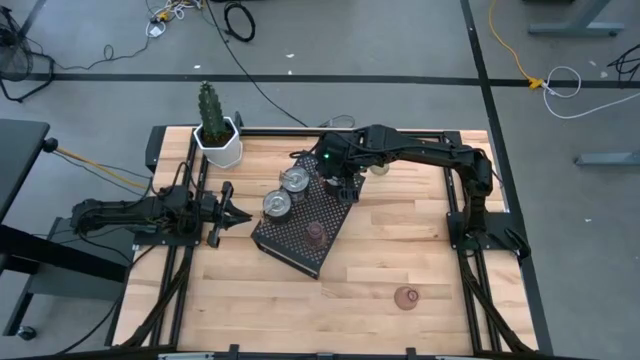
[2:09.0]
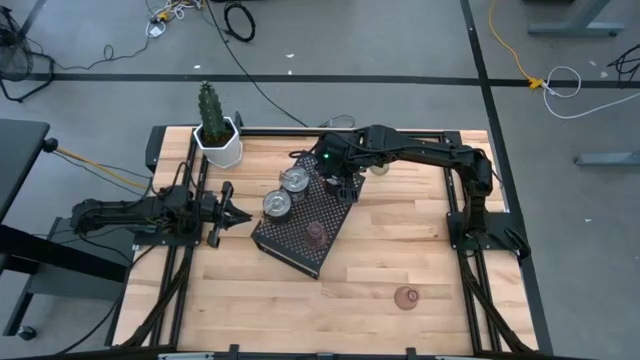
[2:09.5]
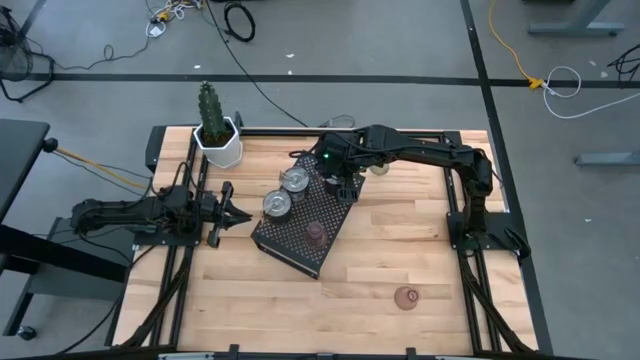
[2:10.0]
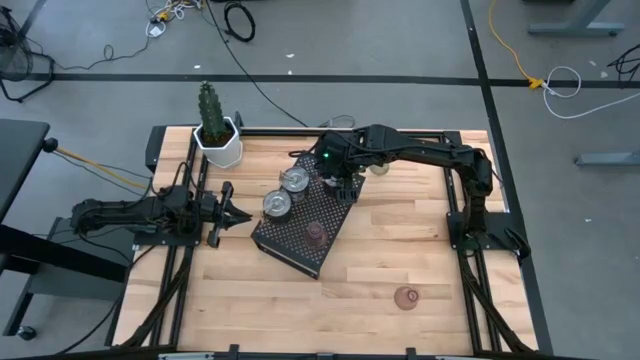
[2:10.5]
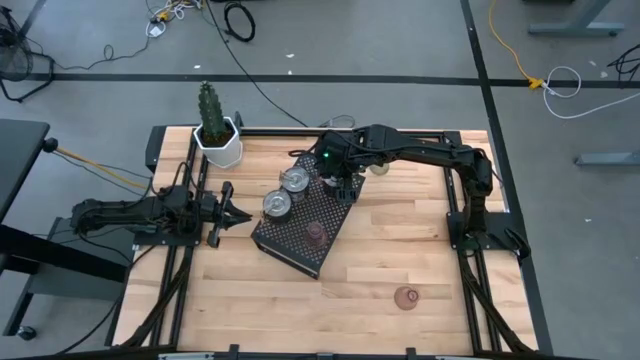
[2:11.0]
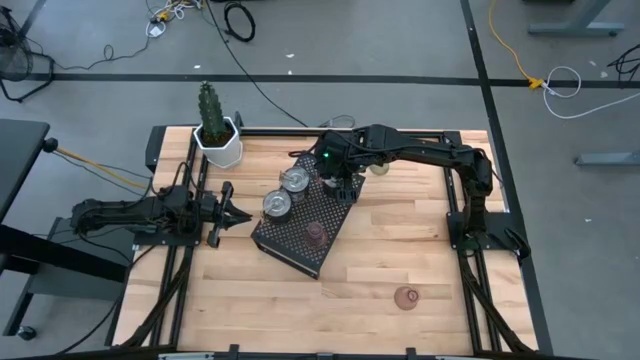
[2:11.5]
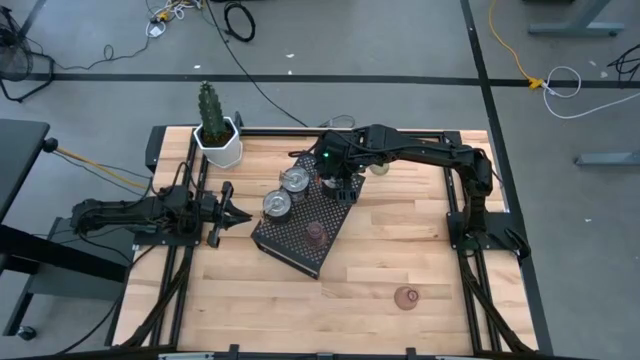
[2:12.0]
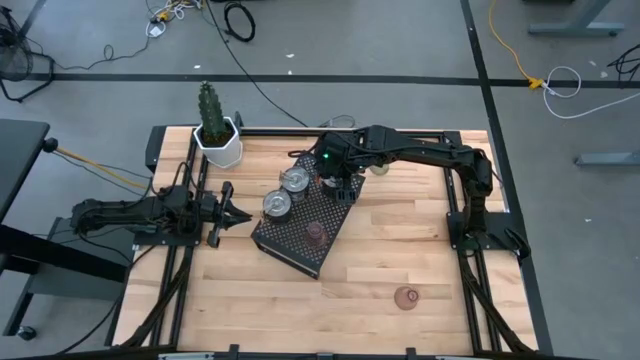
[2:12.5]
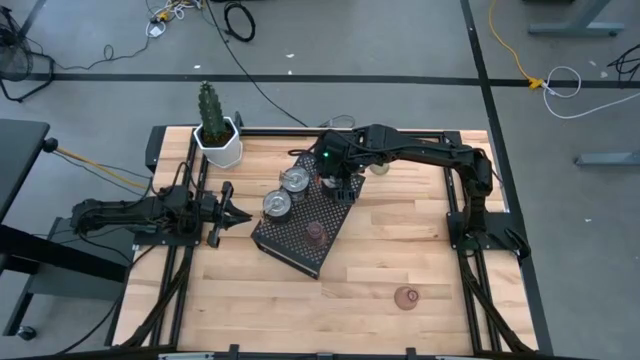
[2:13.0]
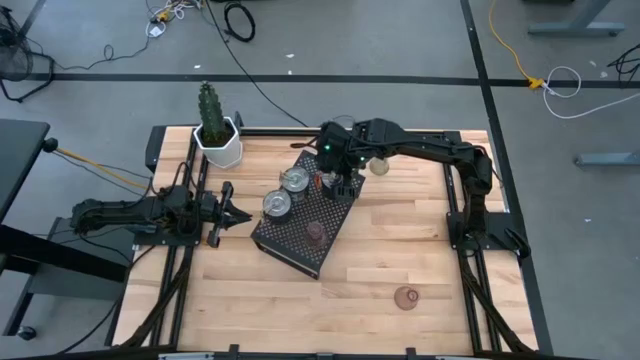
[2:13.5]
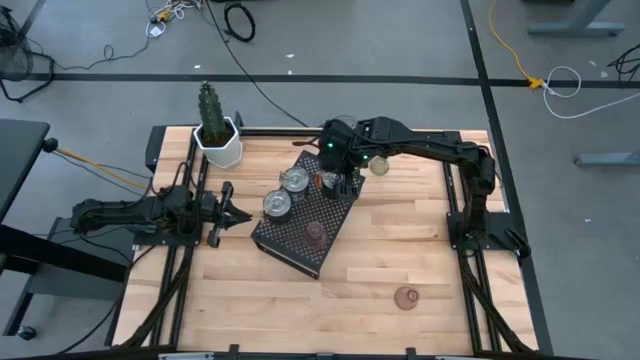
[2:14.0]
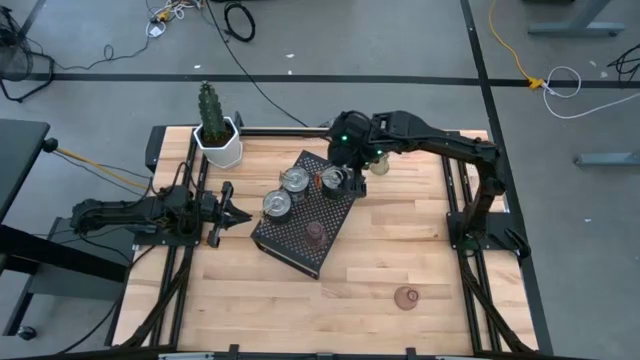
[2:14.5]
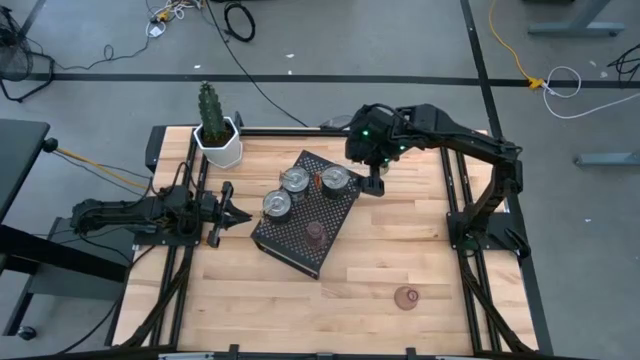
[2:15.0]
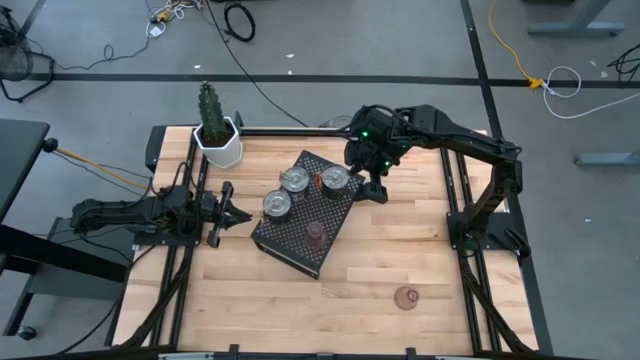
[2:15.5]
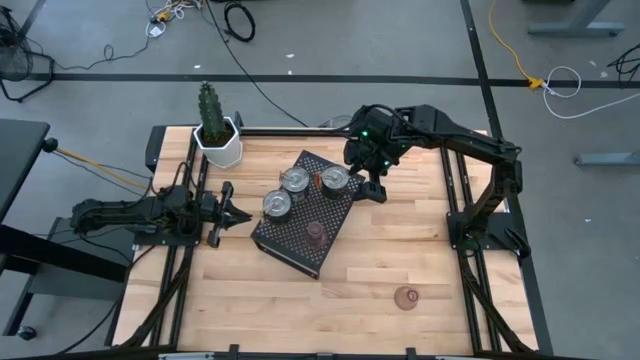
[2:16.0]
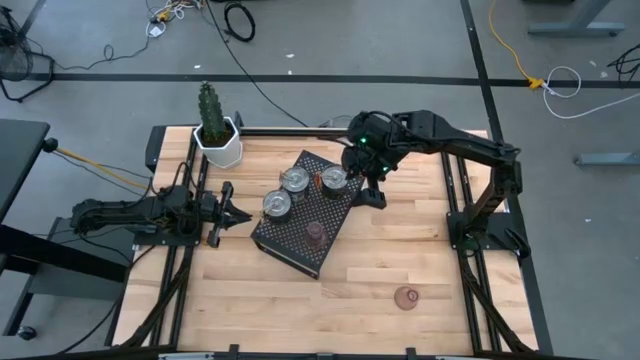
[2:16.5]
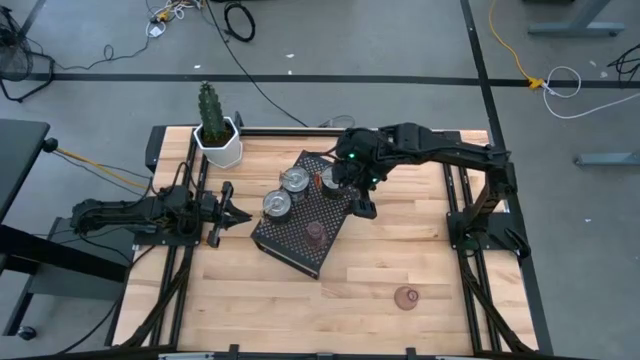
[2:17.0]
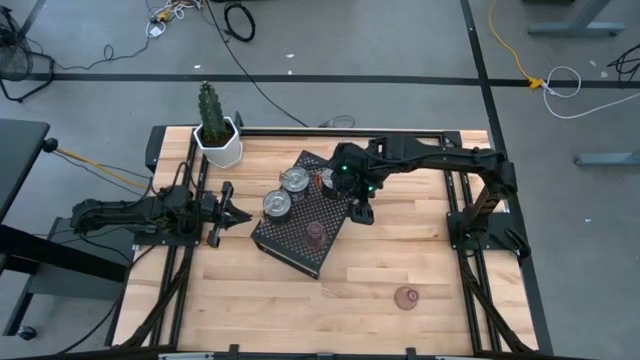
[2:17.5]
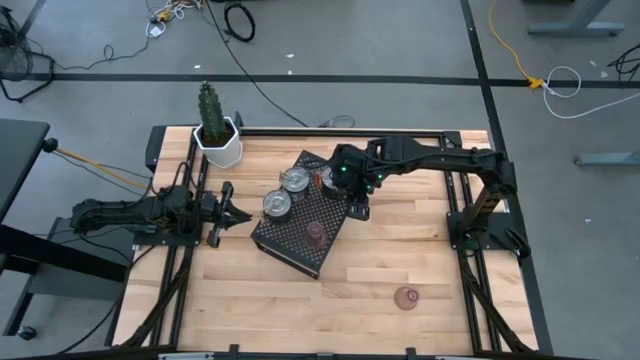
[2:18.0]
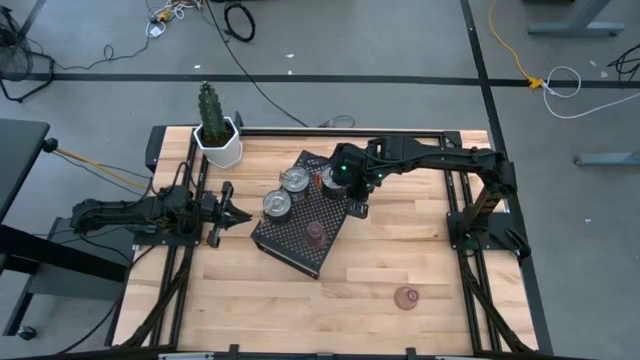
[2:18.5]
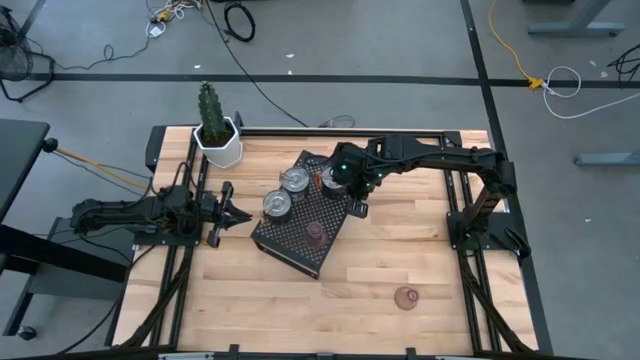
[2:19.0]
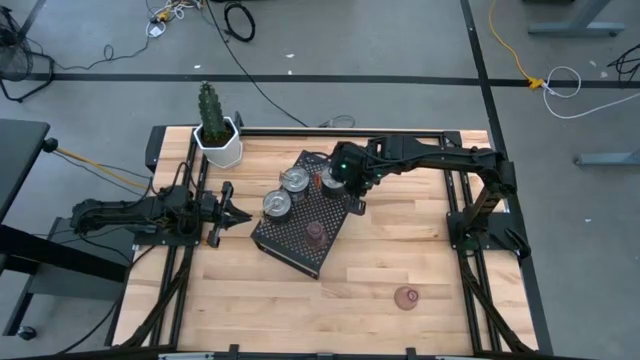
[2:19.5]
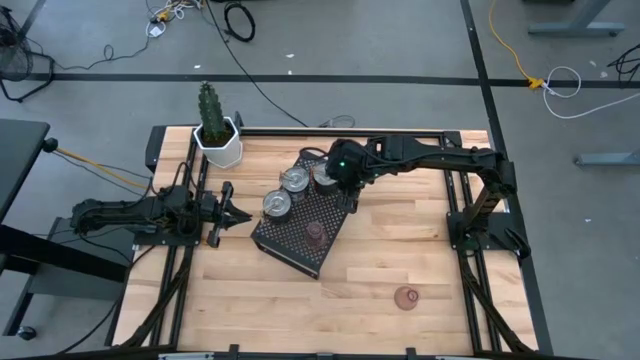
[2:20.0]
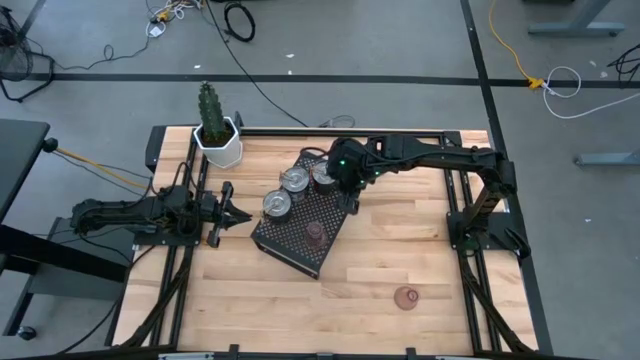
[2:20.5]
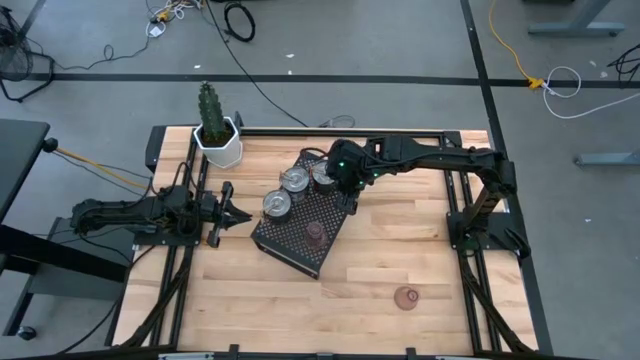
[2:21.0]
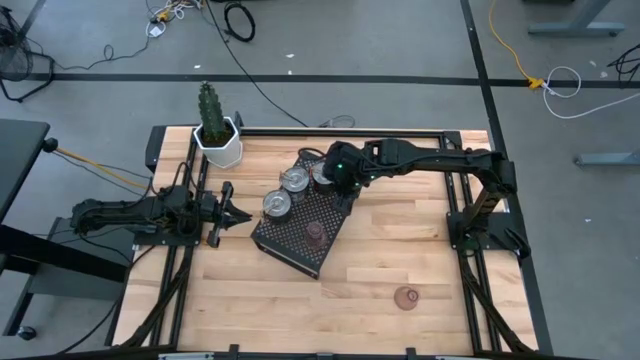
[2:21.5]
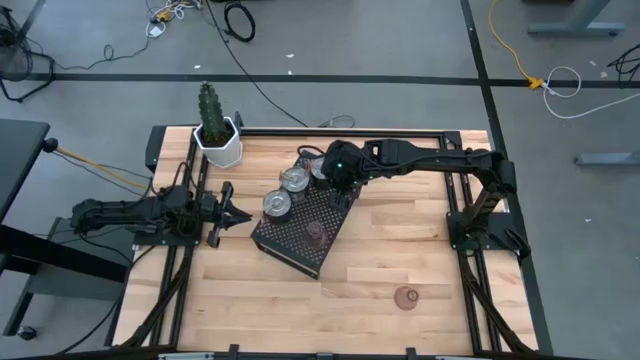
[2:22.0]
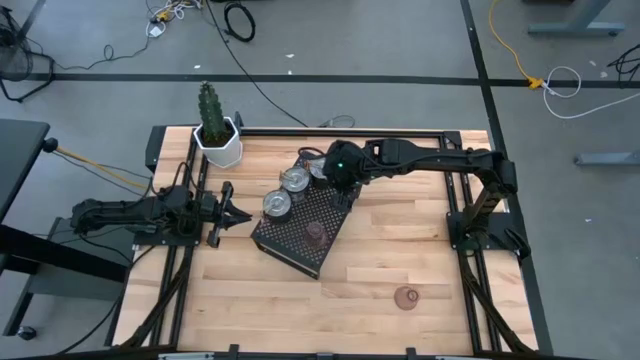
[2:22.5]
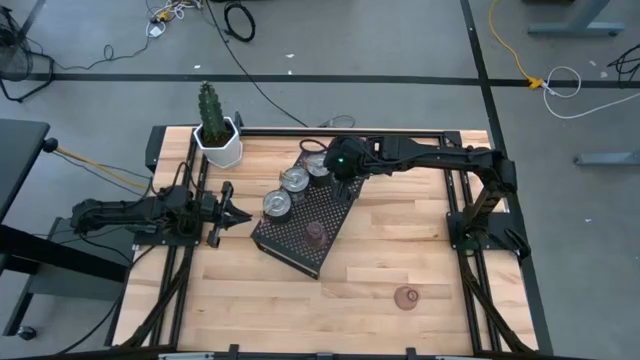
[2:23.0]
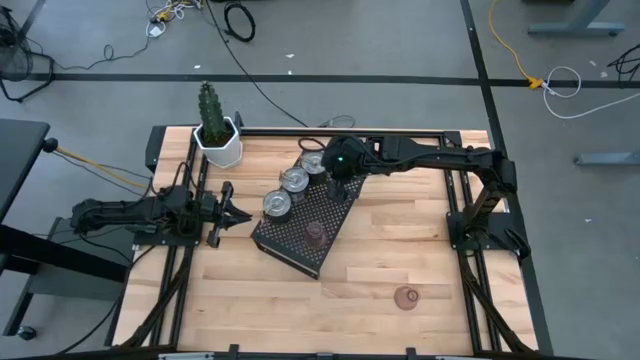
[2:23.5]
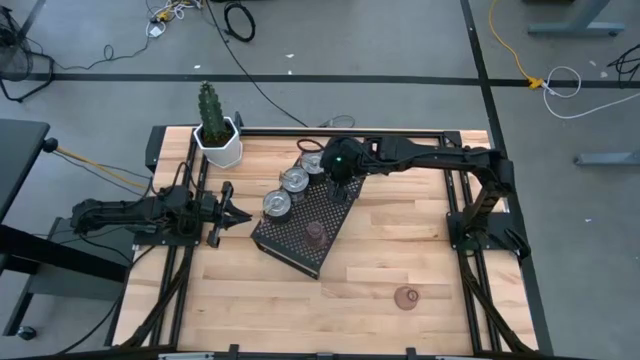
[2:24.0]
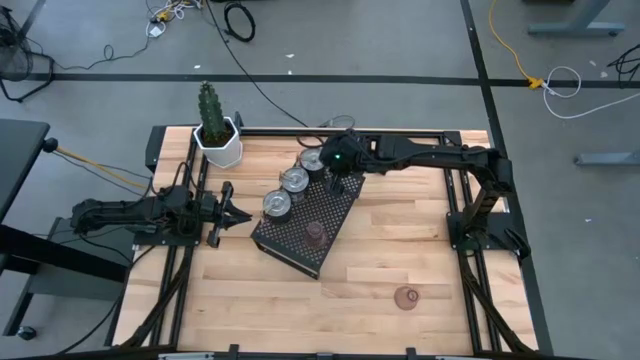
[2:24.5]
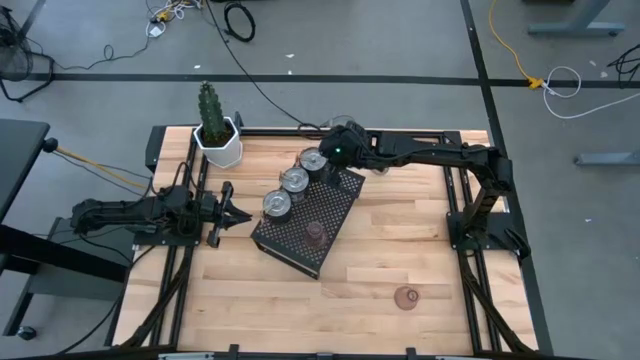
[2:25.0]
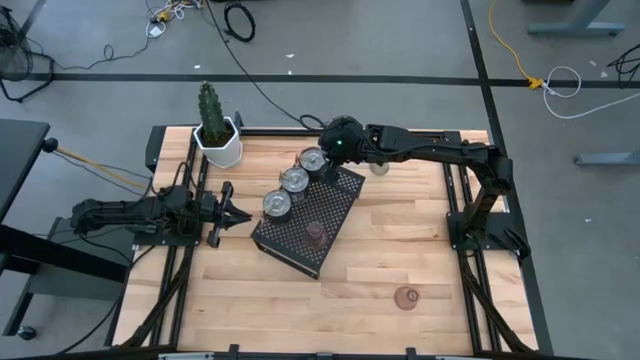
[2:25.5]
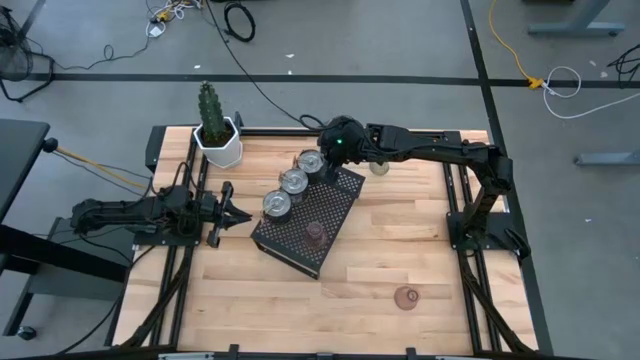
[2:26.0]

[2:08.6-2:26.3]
Task: Pick & Place candle stick holders
Put the silver scented candle on the shelf

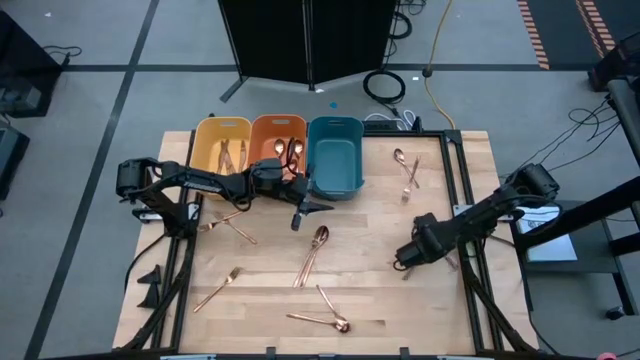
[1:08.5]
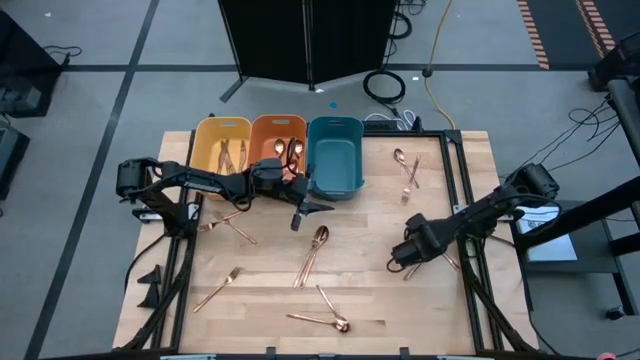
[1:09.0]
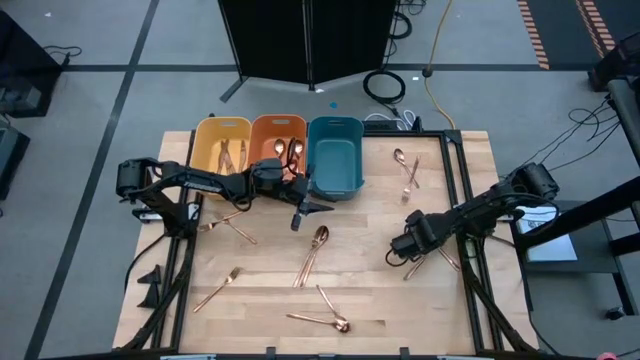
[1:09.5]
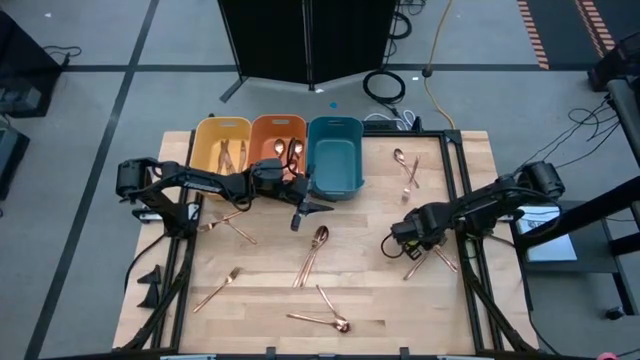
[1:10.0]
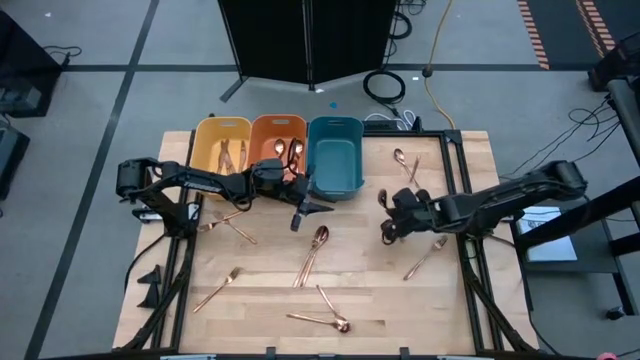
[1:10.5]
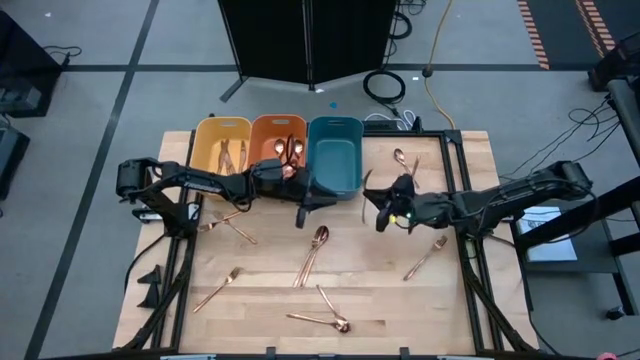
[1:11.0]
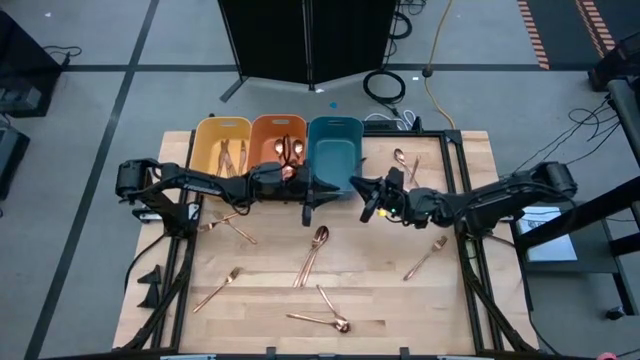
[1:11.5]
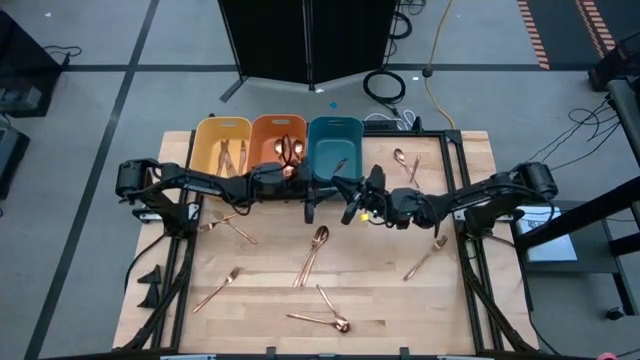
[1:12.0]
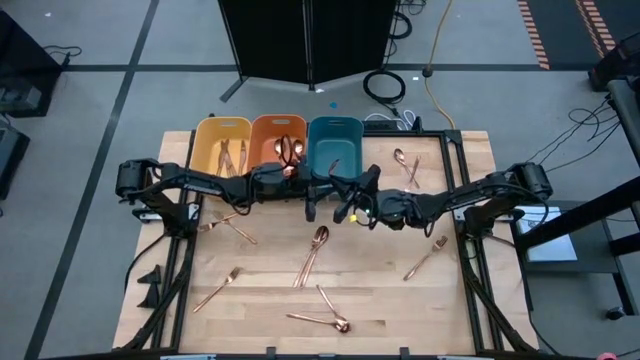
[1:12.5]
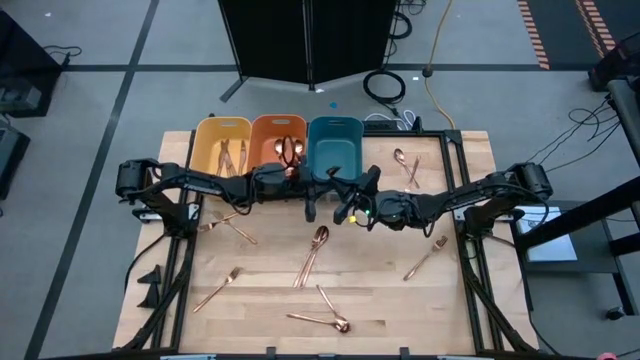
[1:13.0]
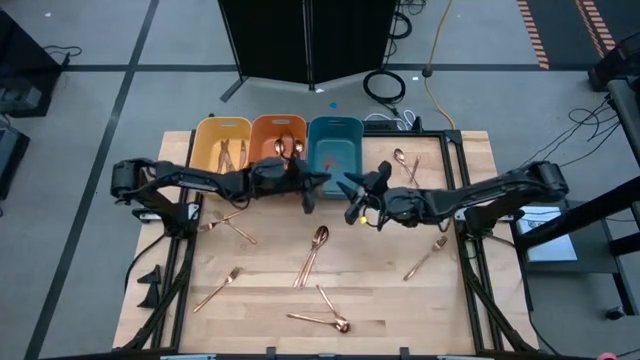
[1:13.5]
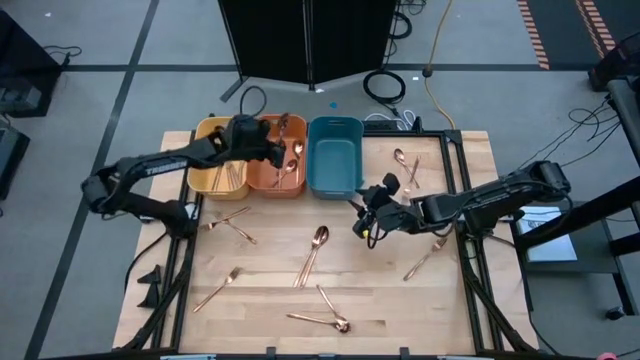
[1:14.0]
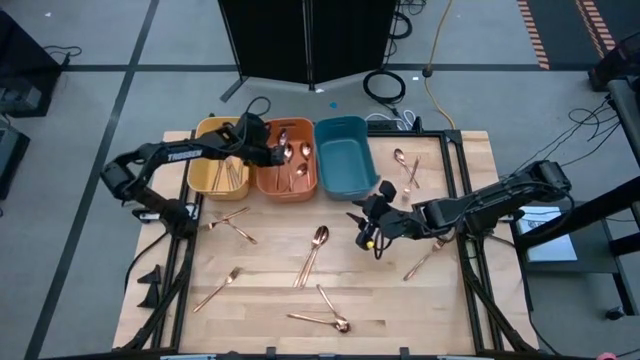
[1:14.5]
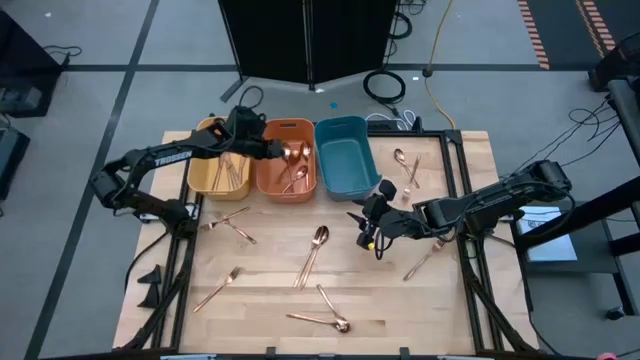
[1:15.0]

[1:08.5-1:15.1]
Task: Sort silverware
Put the gold spoon into the orange bin
